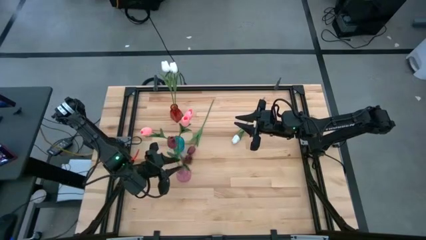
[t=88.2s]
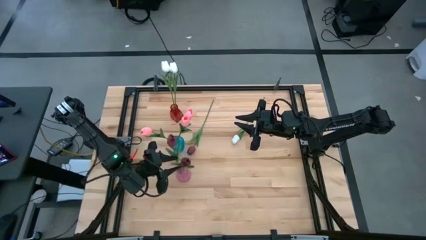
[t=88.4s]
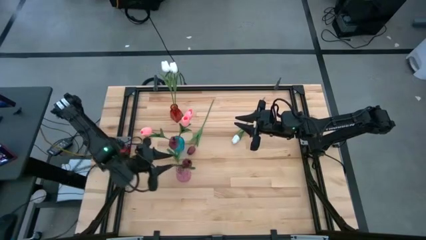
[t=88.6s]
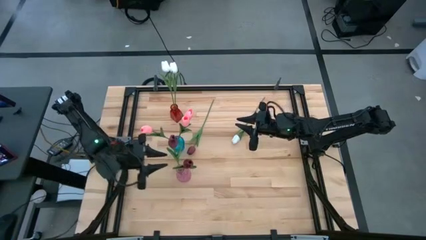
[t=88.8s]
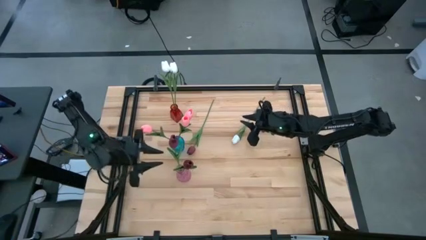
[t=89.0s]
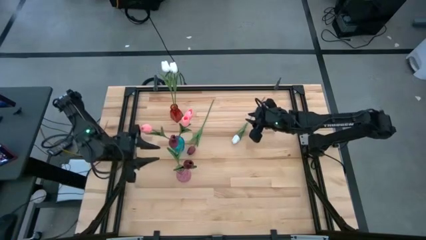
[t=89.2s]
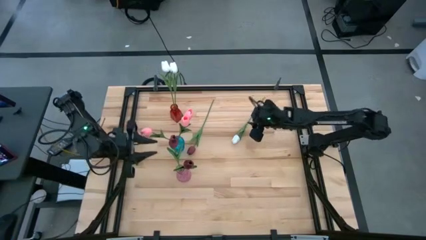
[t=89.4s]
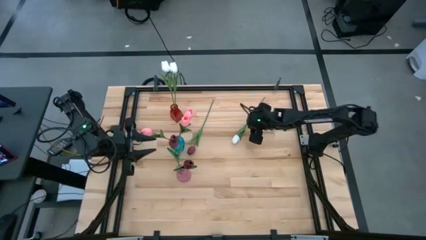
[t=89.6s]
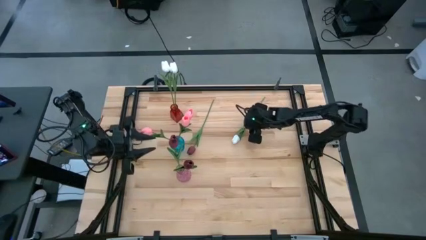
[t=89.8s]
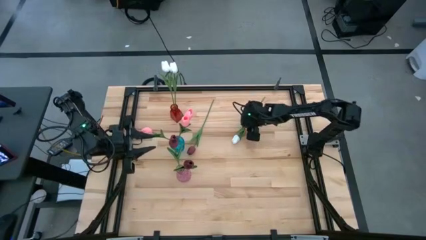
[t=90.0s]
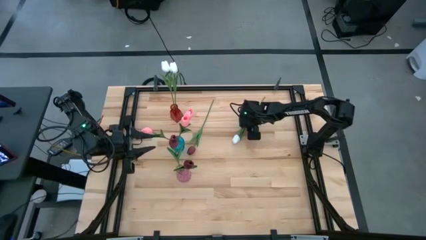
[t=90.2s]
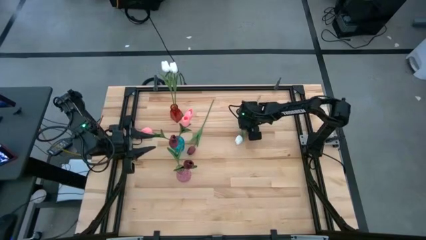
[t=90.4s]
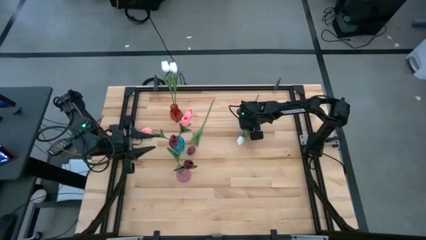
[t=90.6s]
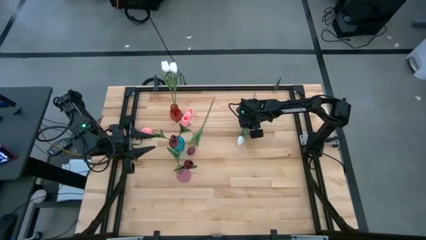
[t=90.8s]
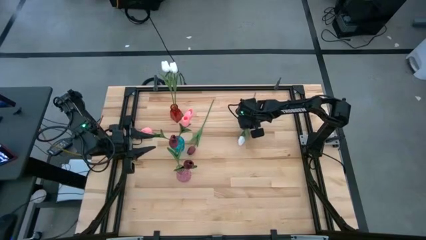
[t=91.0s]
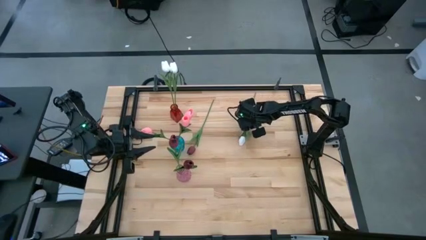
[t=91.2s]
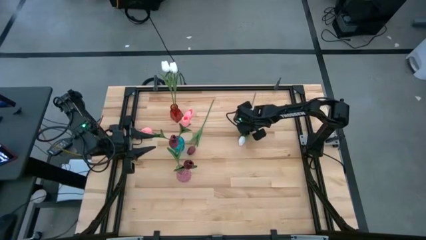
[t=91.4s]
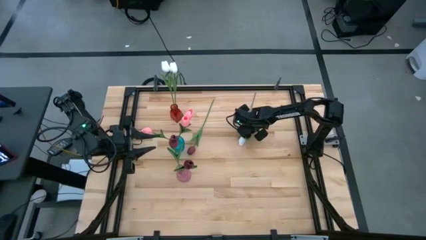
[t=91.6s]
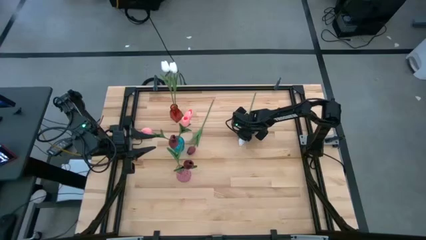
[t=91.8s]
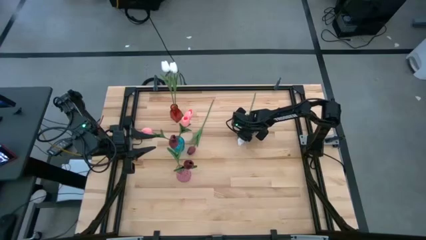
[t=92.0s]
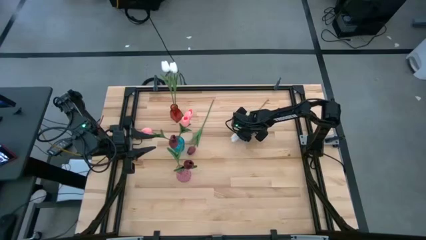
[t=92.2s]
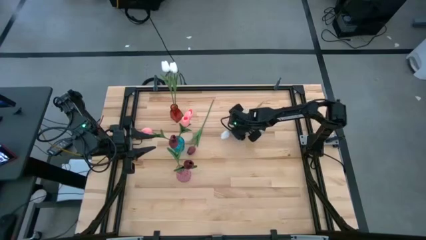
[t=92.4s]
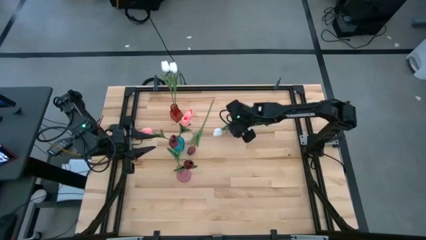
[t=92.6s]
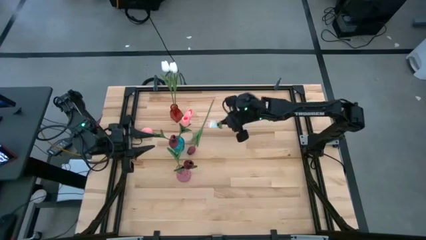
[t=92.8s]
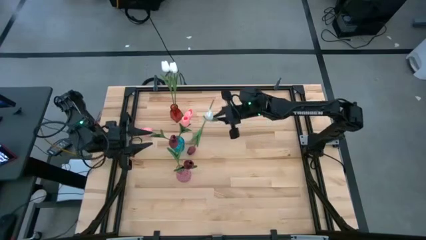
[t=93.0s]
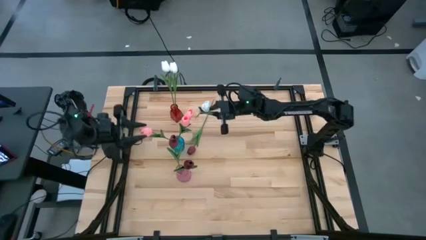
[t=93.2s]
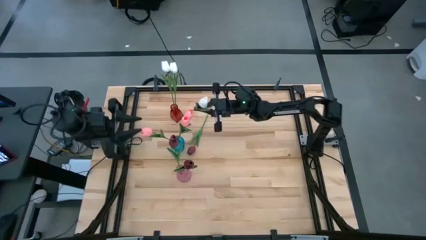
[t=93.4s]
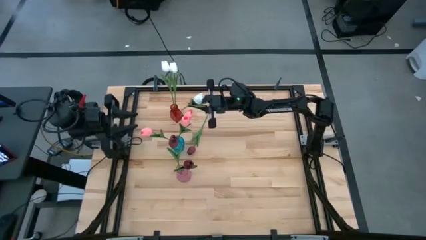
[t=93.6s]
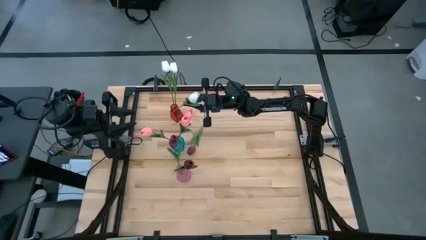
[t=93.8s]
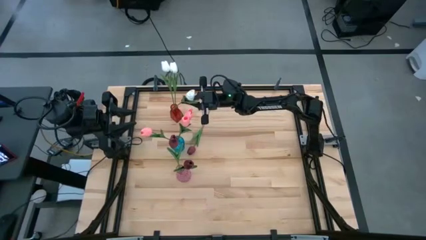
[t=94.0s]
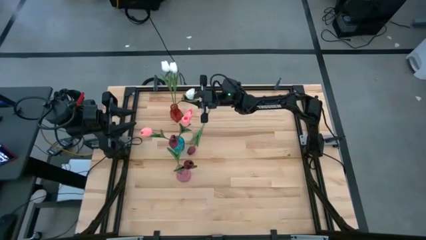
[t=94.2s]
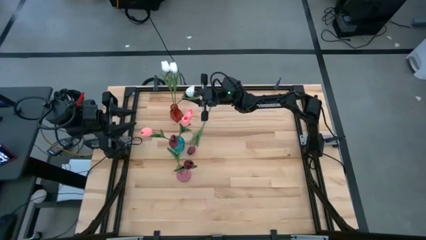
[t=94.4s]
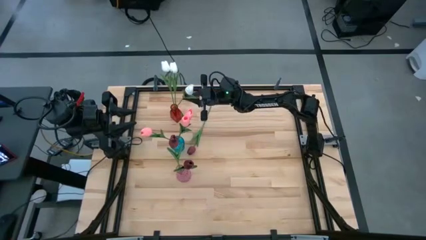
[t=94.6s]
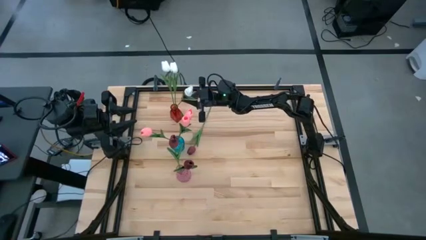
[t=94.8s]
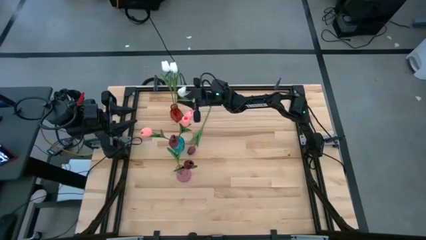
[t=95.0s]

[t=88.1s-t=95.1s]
Task: Sort flowers into vase by color
Put the white flower into the red vase

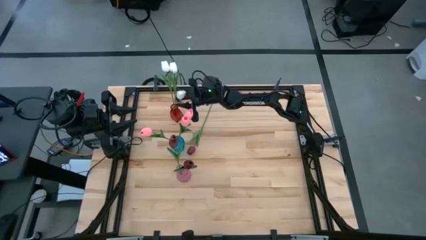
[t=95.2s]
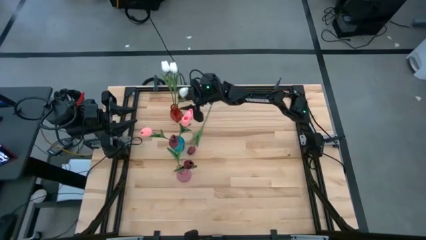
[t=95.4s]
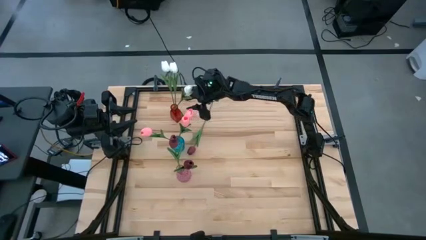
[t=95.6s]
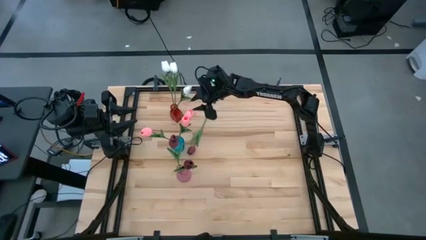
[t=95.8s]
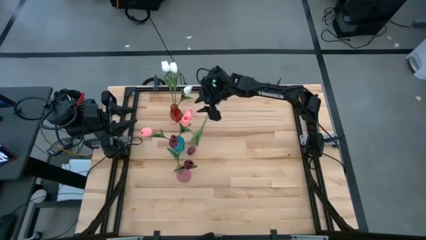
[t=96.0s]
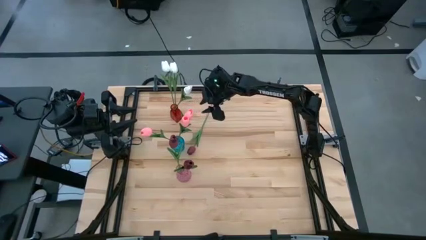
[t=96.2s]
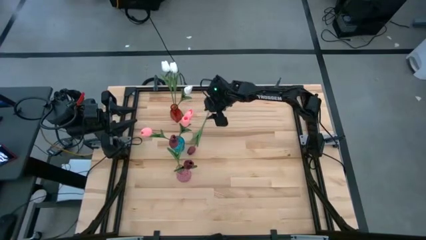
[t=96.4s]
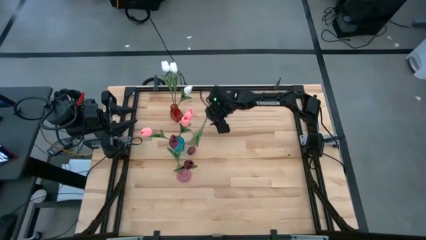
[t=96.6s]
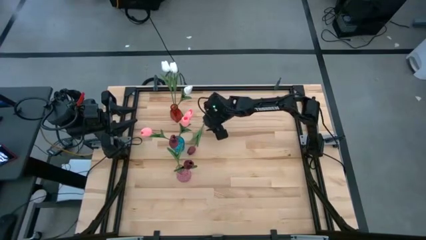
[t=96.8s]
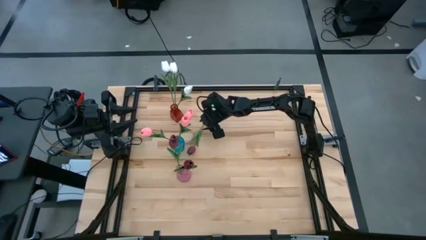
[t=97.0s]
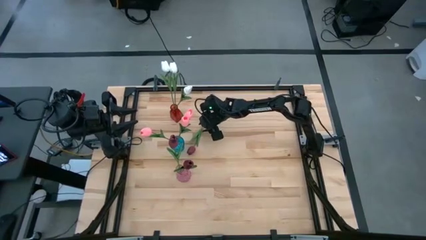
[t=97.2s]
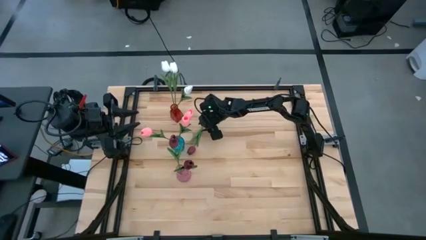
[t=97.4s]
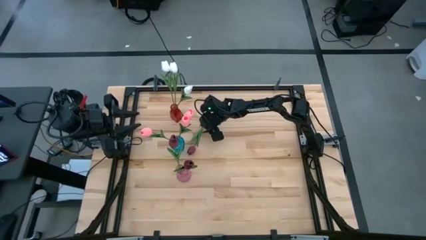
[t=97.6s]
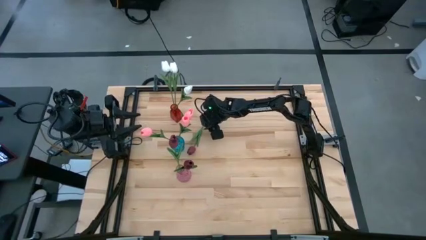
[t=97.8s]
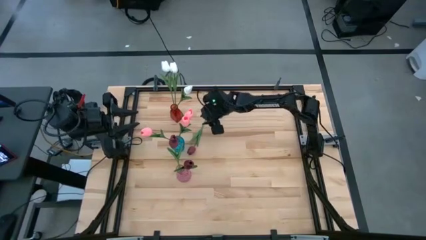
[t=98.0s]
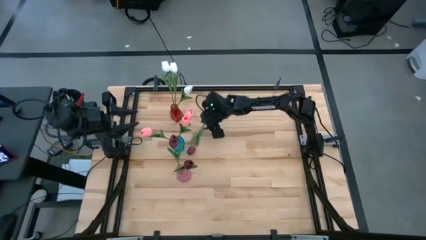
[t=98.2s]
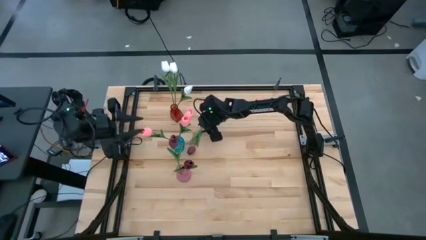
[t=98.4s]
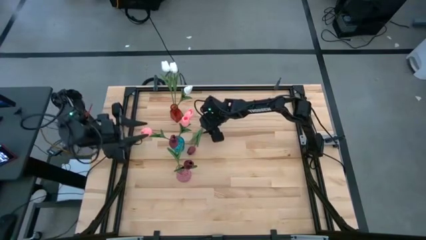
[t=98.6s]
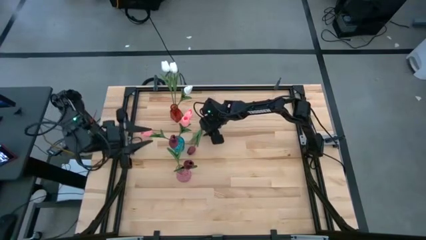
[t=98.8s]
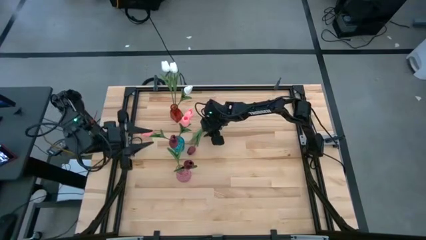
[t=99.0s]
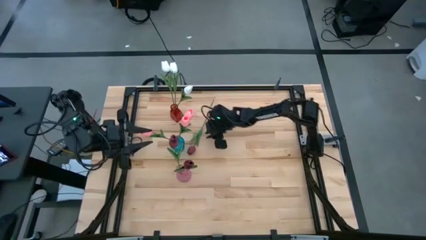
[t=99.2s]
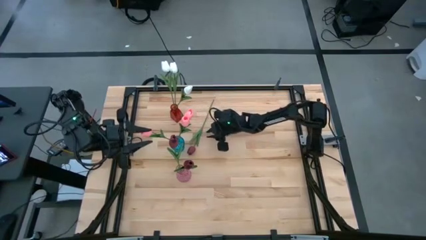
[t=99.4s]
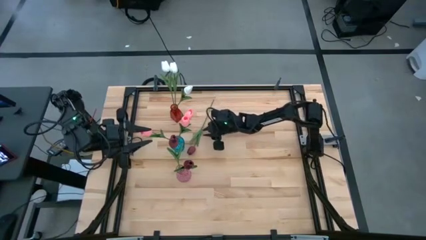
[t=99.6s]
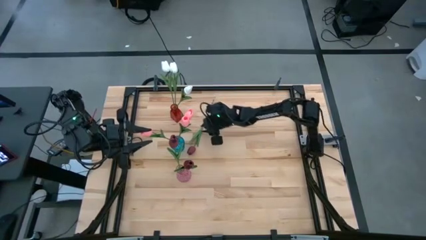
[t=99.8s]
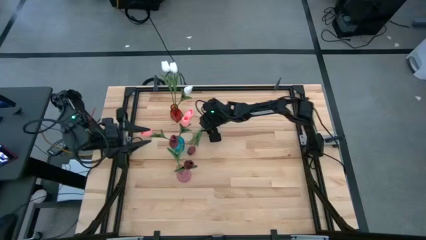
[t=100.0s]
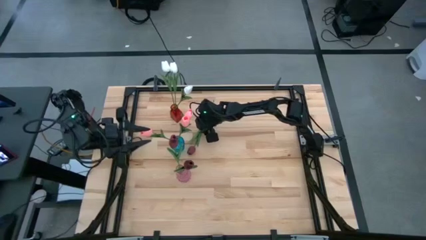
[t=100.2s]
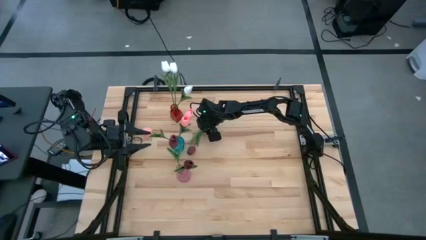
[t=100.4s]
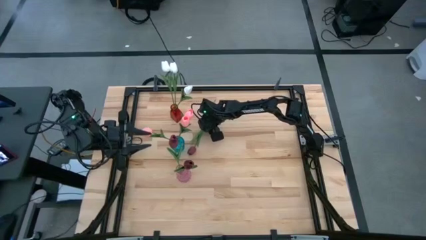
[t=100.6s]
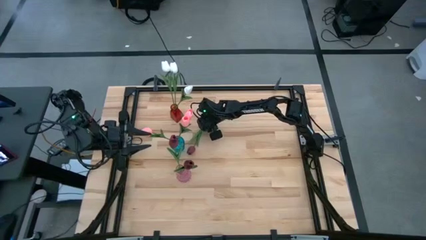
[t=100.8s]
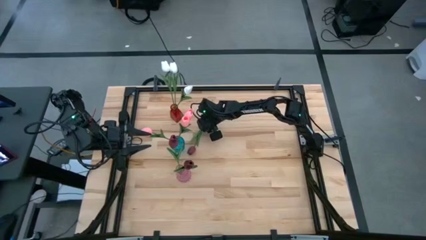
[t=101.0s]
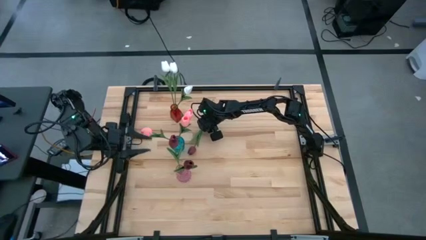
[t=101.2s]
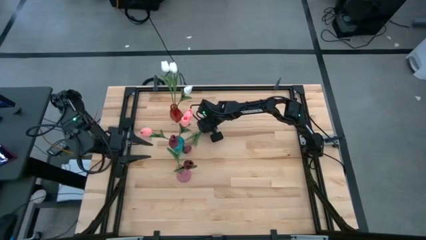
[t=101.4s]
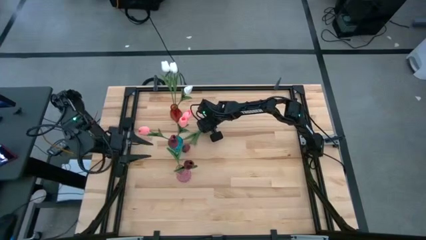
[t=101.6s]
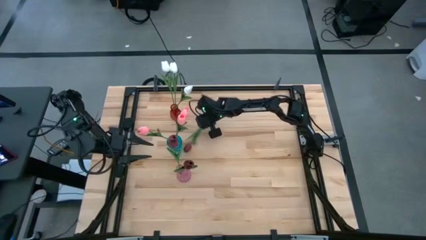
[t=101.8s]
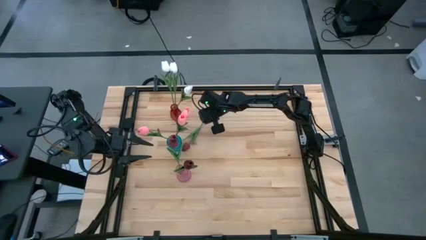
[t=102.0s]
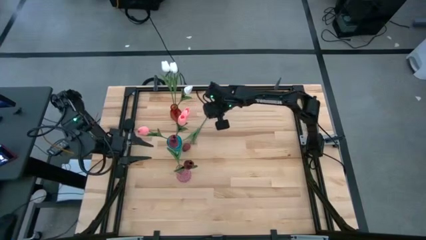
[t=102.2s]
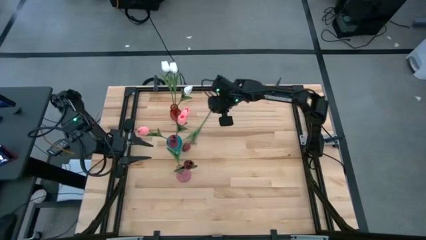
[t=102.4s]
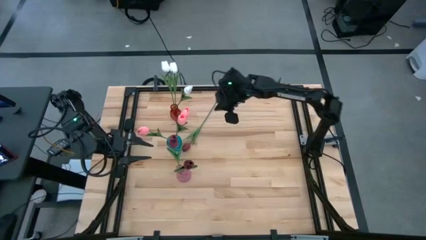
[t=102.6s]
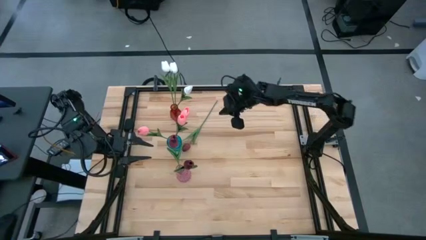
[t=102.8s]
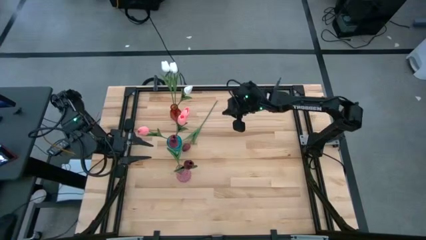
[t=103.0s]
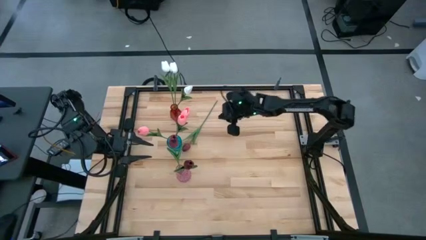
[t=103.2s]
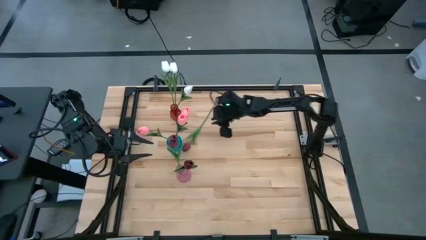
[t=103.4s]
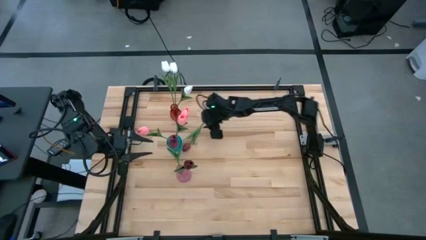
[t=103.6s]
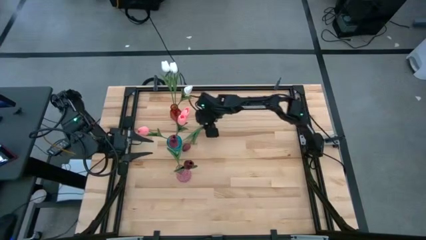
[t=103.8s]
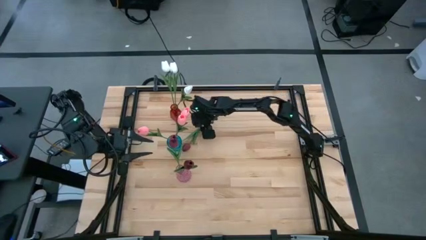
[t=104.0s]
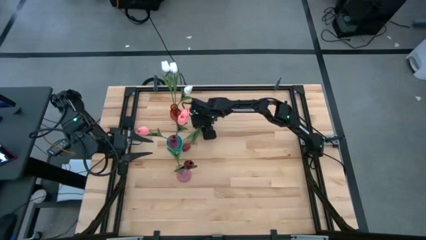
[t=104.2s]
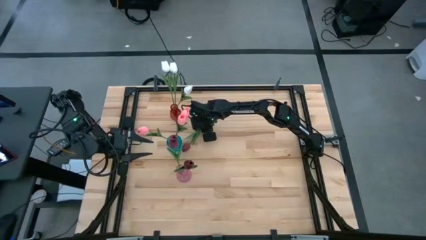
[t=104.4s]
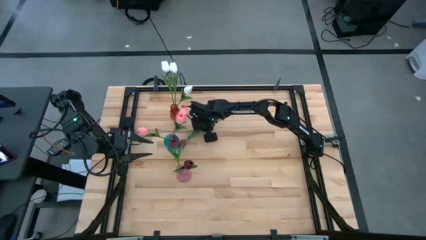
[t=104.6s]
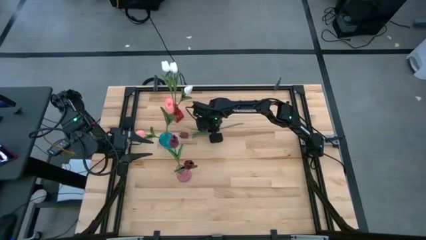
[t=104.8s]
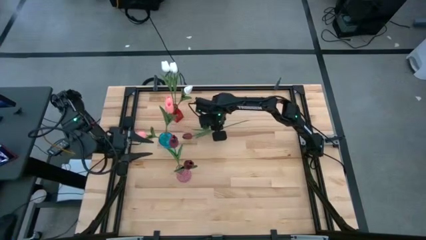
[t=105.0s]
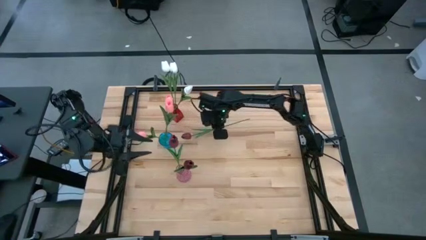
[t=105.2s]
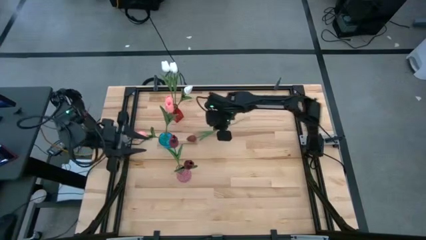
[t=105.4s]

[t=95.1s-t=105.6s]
Put the red flower into the pink vase
